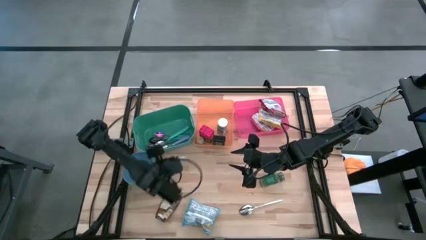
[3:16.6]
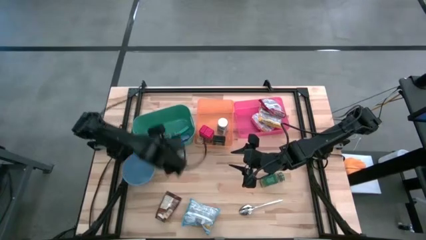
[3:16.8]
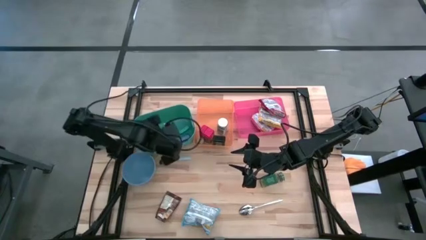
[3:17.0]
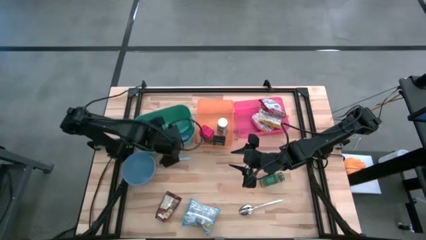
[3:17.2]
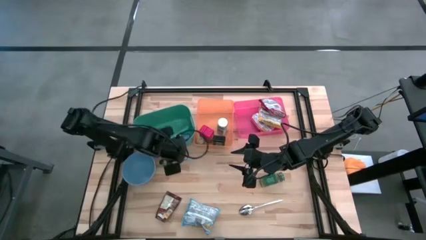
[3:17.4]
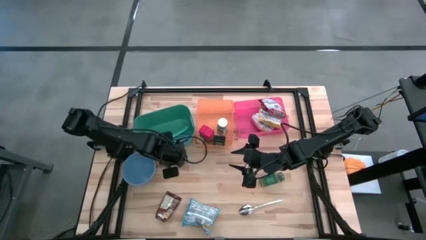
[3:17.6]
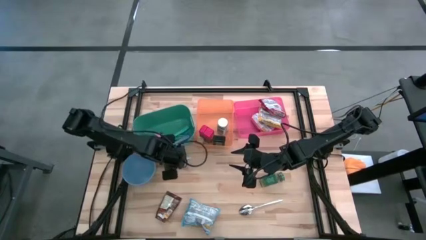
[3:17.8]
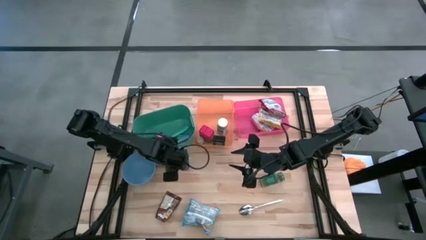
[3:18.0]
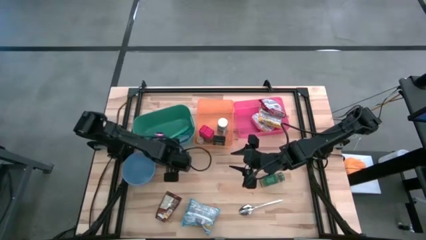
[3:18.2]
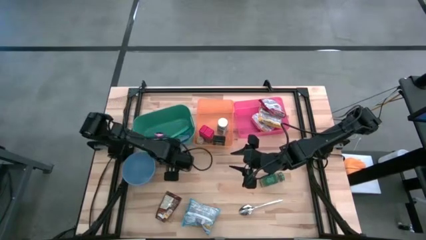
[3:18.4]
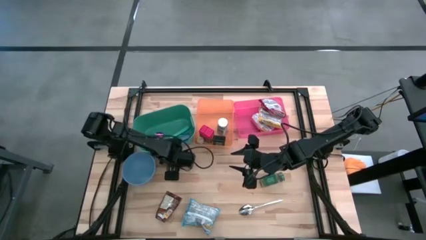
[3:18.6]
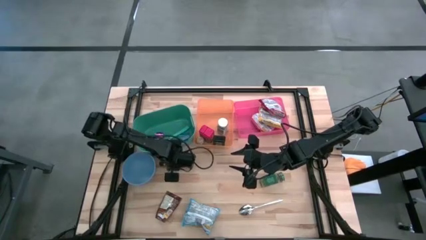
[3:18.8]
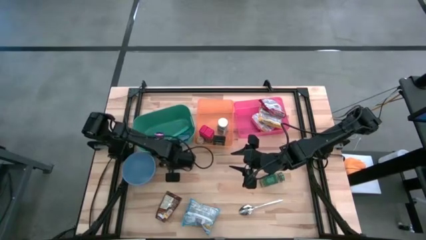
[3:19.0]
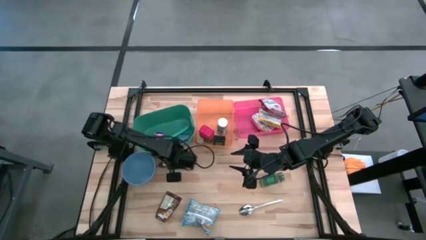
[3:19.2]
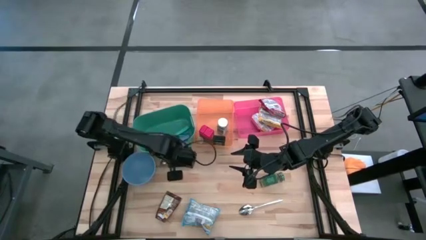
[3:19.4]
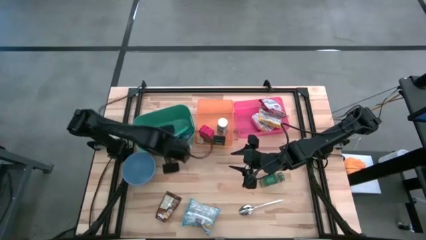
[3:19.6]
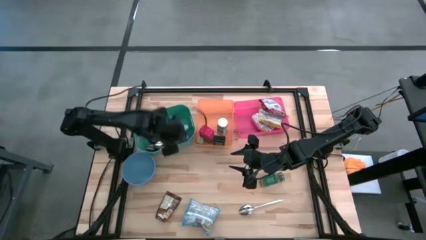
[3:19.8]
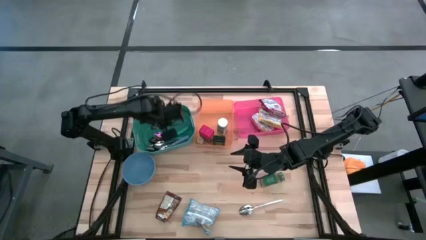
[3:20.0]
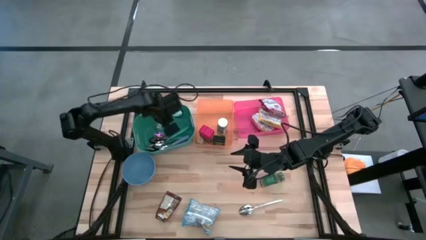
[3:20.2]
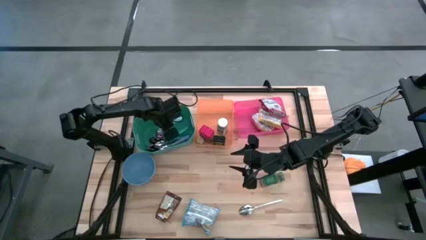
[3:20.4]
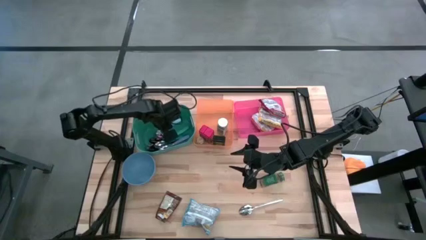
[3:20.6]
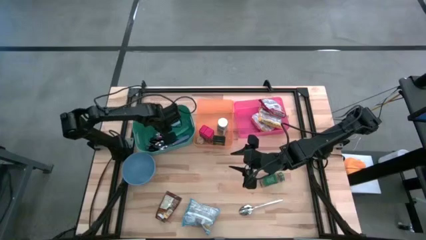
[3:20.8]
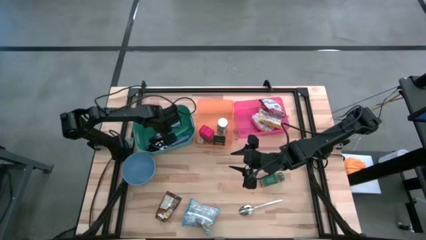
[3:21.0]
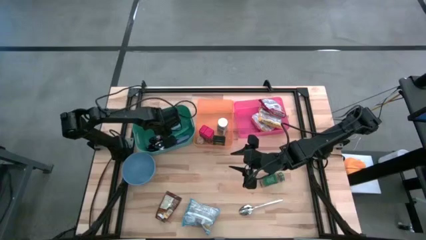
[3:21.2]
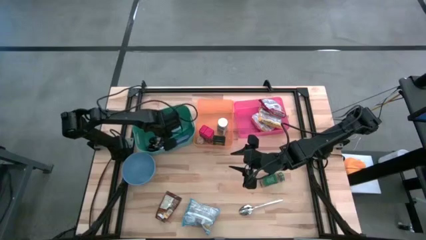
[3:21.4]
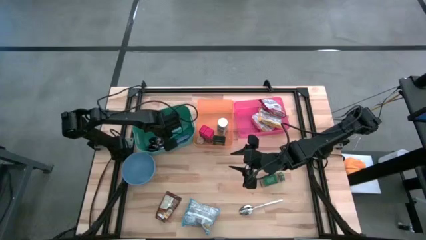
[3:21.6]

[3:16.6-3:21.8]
Put the dark blue spoon into the green bin

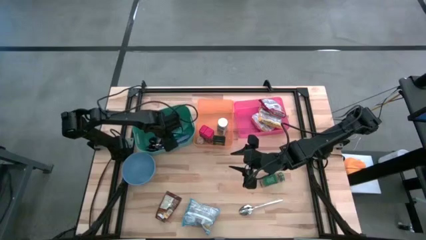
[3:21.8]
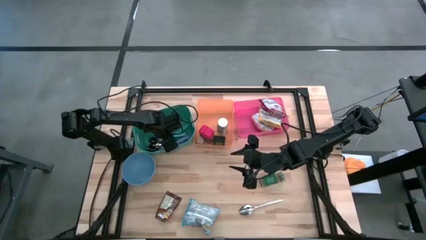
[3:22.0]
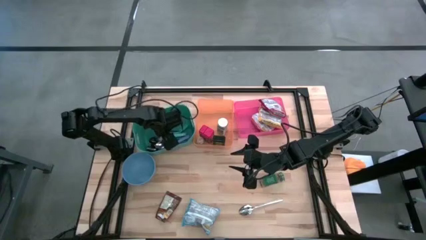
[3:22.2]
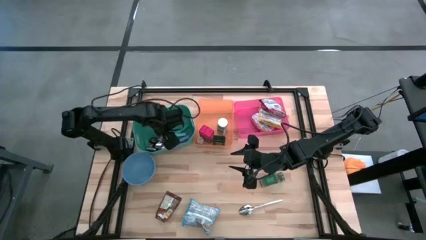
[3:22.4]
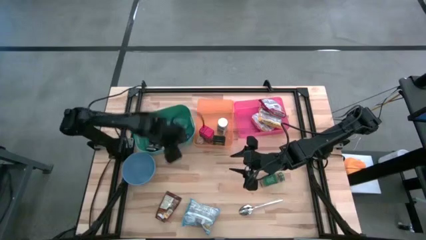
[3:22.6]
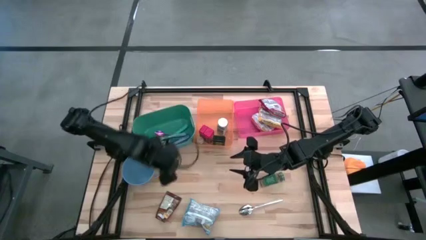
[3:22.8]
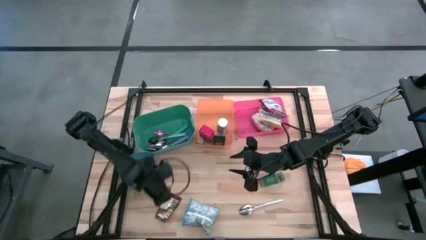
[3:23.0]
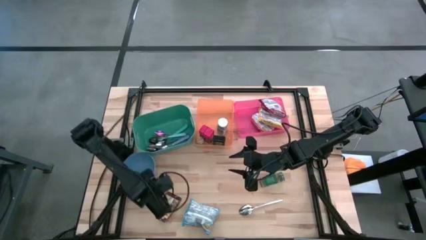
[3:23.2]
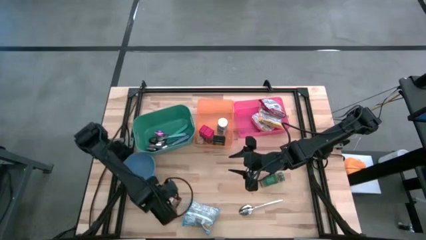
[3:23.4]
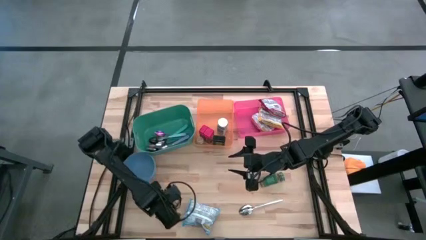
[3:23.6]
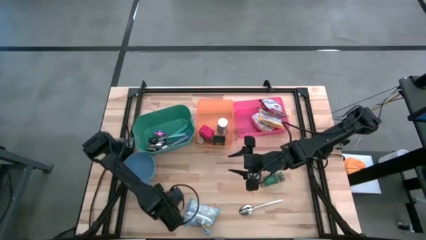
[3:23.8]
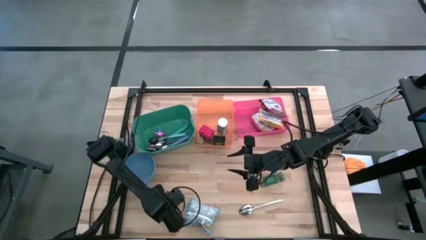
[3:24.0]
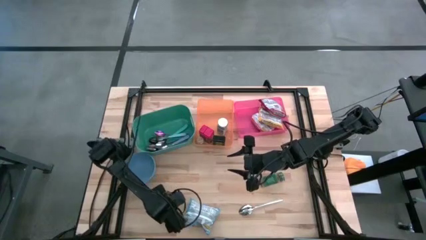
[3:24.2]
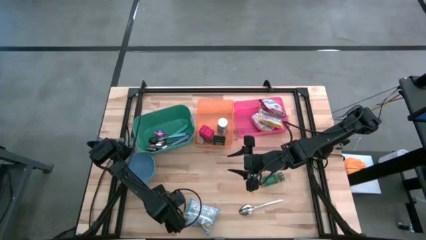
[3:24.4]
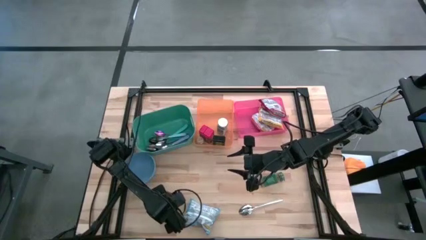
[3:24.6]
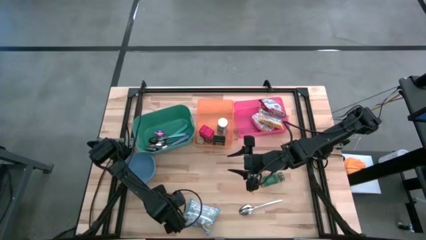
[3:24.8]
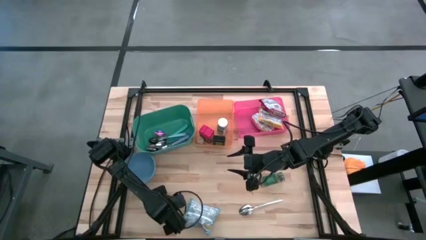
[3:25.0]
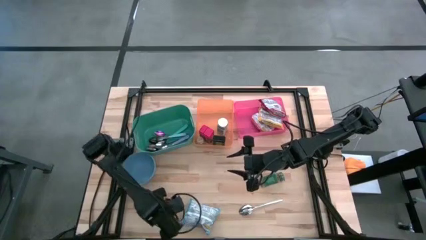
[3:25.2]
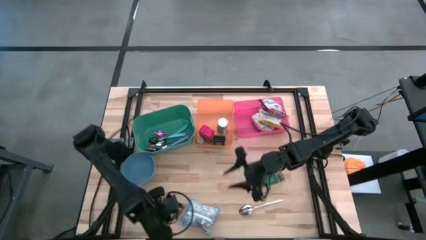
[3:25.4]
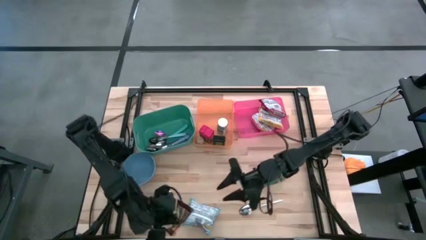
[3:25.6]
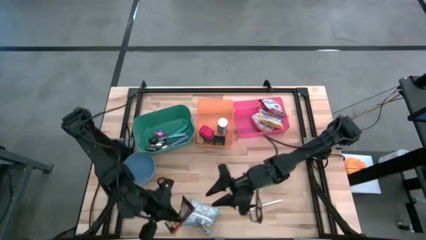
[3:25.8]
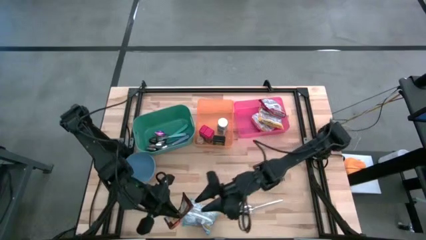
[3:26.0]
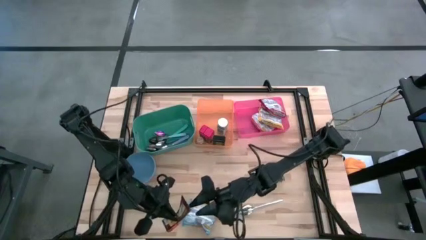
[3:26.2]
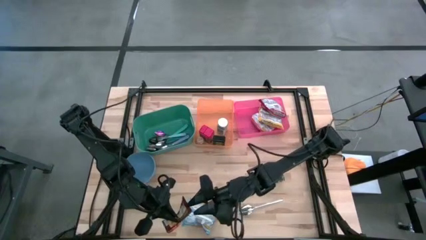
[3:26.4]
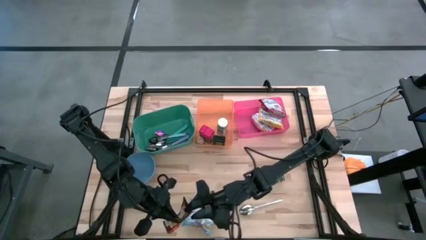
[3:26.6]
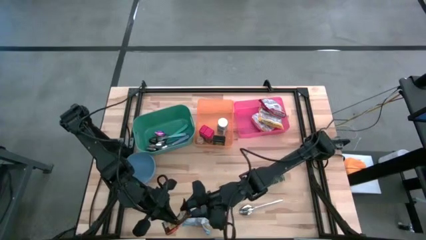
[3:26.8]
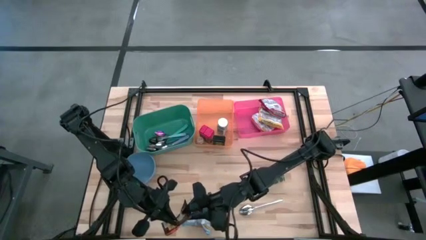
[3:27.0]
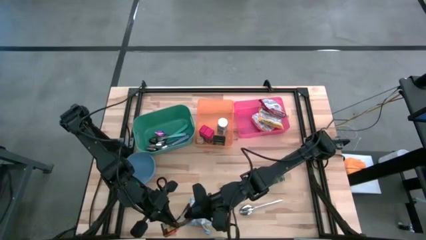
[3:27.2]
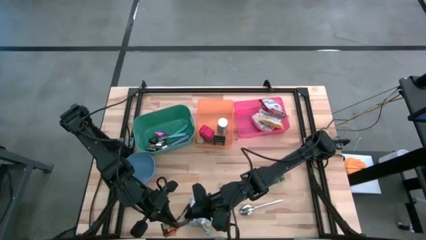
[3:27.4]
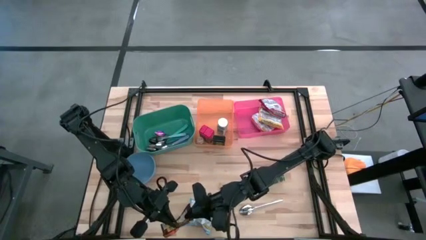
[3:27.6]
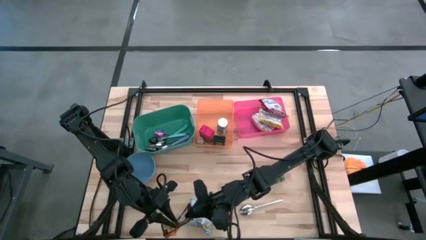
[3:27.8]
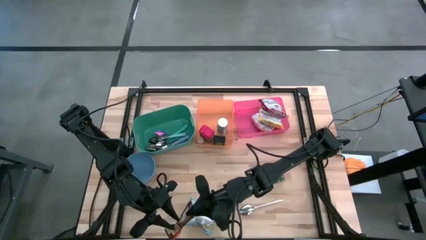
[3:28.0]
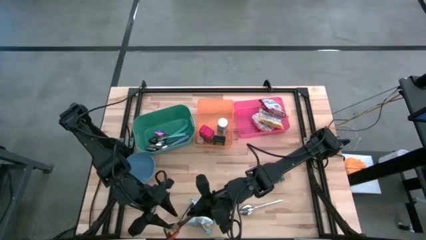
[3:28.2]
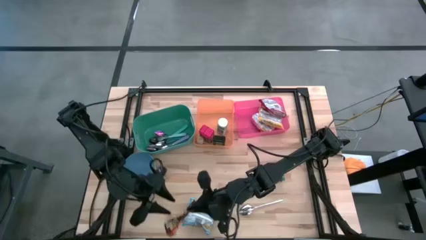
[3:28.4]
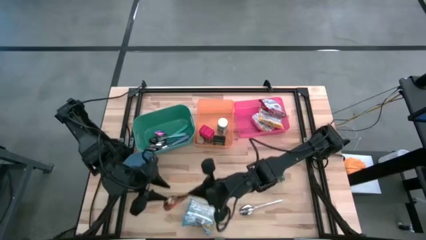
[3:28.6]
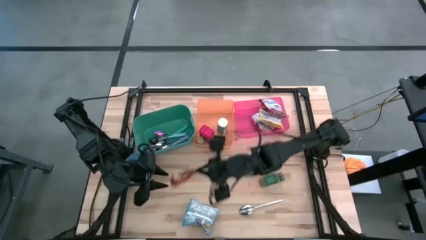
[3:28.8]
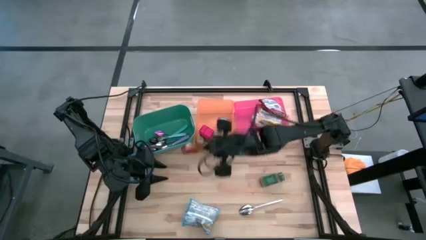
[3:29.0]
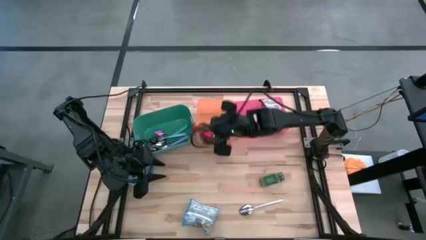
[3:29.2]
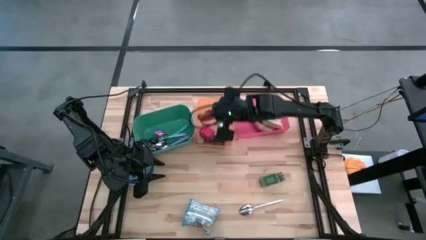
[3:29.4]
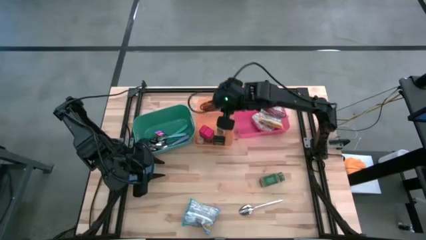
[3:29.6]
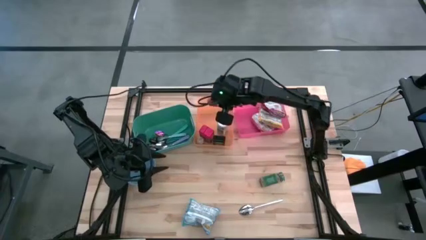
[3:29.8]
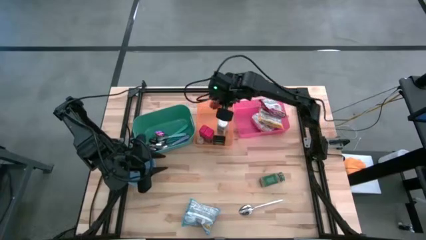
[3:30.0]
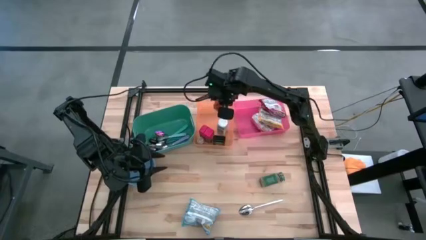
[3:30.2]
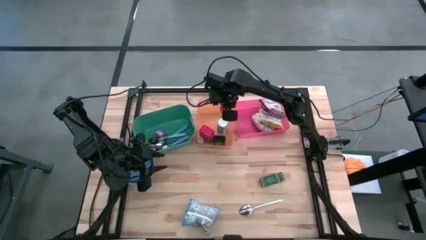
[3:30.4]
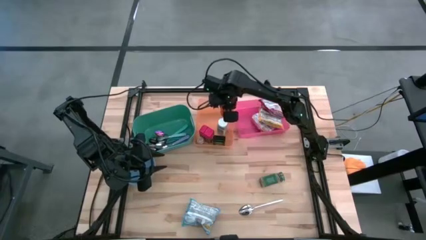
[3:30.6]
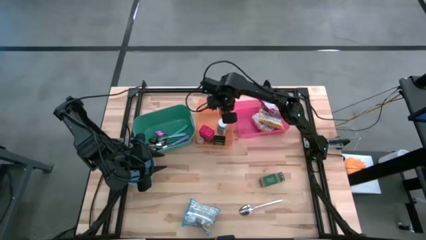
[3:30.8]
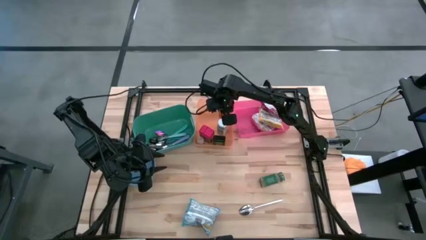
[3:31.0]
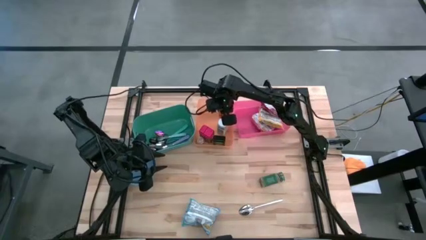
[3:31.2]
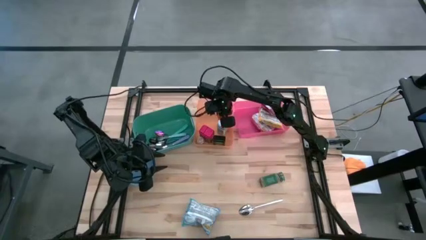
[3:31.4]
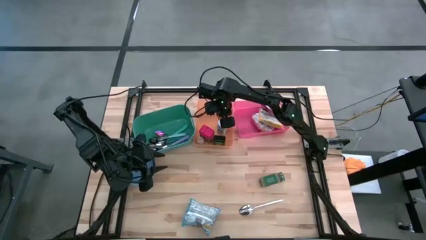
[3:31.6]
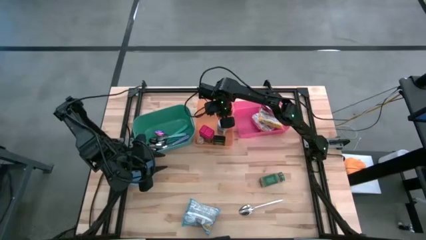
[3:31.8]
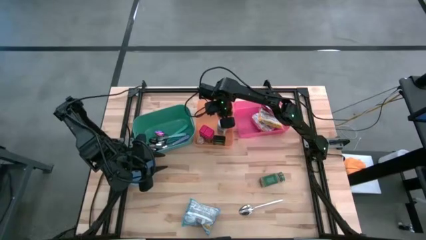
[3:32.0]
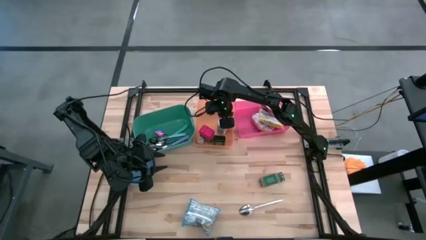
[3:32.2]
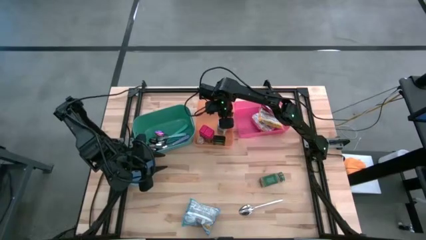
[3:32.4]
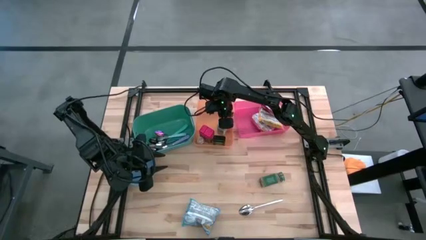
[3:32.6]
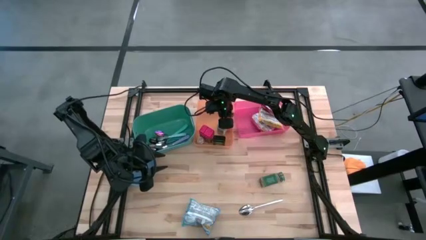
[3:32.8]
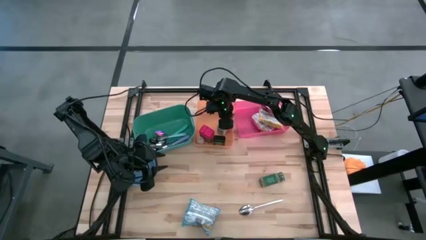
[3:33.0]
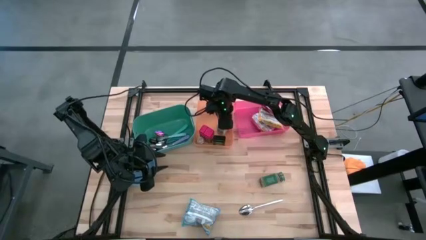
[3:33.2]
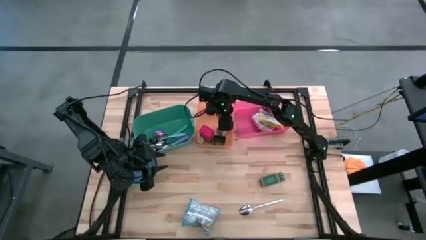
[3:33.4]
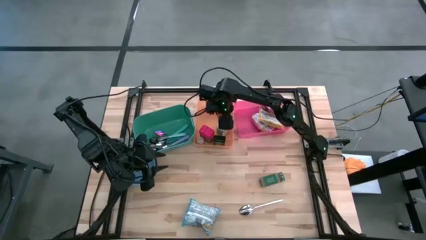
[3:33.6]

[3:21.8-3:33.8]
Put the orange seasoning pack into the orange bin
